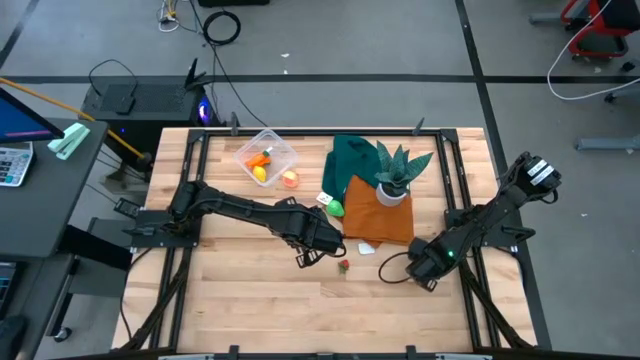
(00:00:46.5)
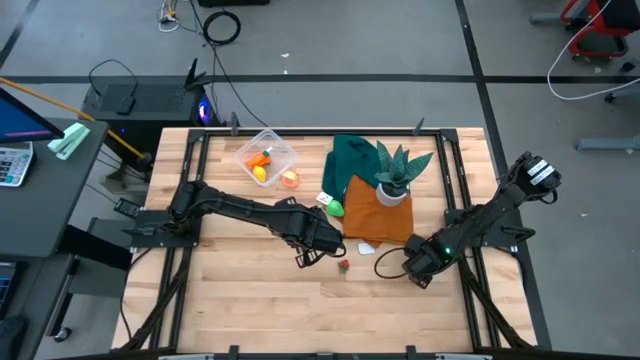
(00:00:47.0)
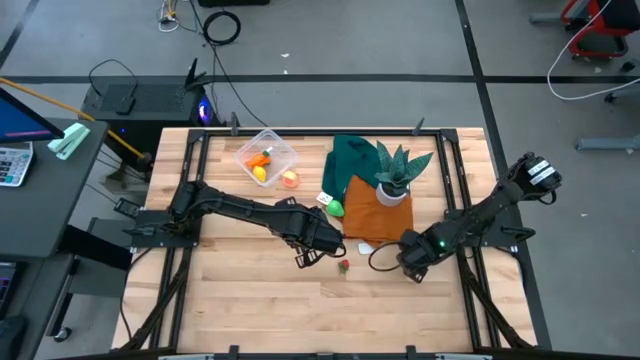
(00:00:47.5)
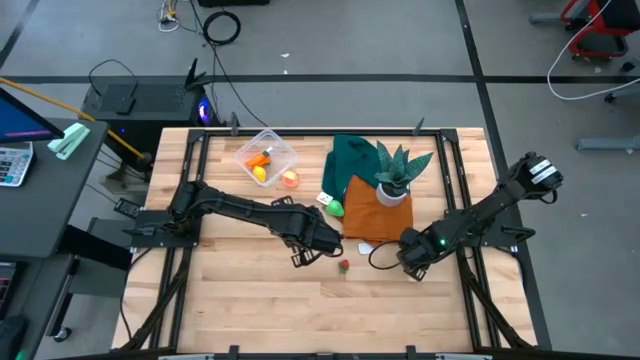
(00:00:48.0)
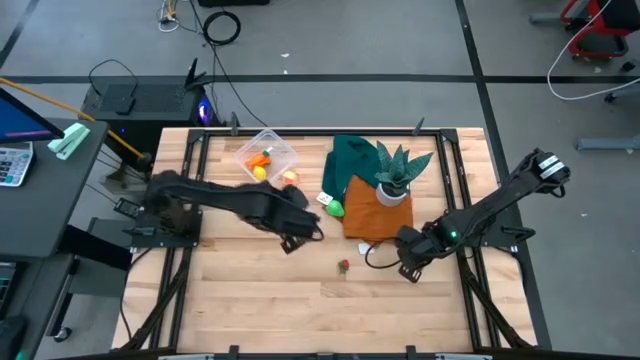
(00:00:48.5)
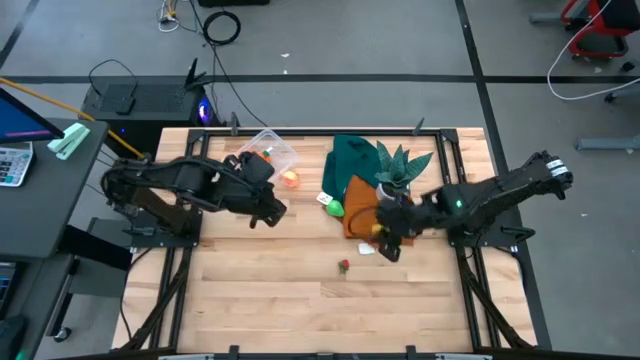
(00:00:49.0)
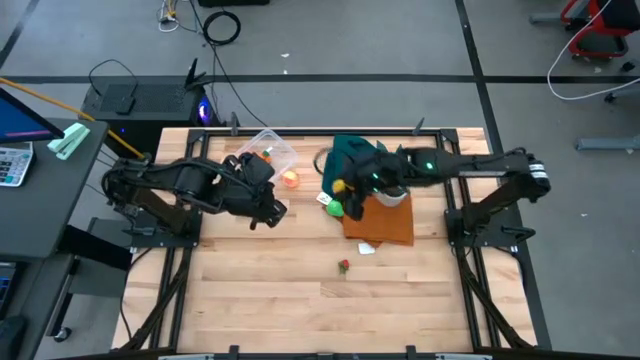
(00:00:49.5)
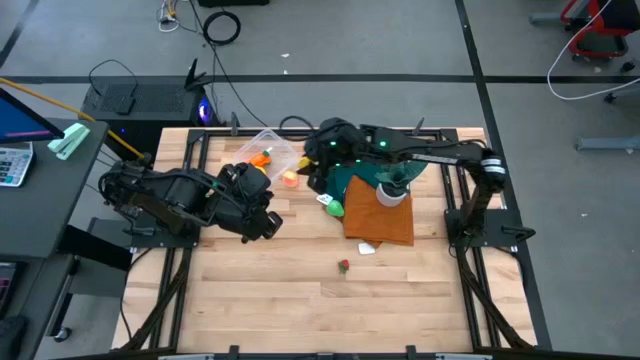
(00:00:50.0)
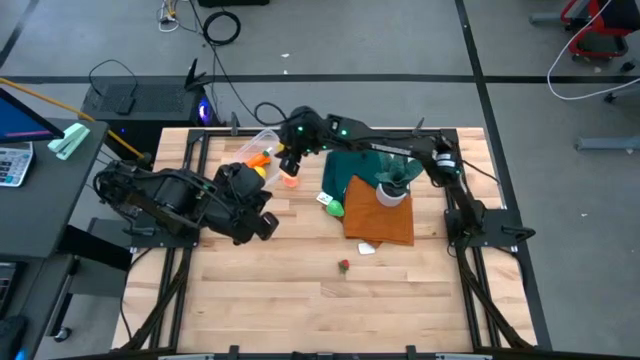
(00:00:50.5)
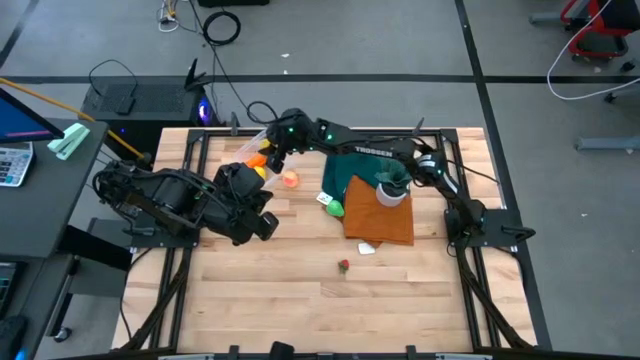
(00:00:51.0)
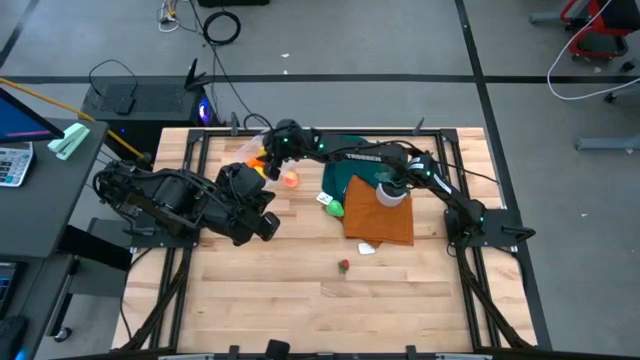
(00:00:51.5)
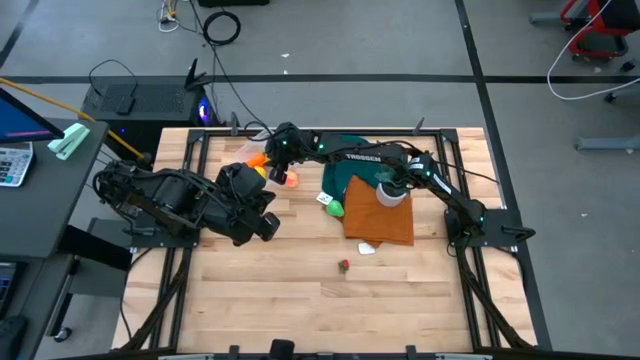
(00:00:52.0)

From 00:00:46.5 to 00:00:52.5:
Task: Pick and placing Produce into tupperware
Put the lemon into the transparent container

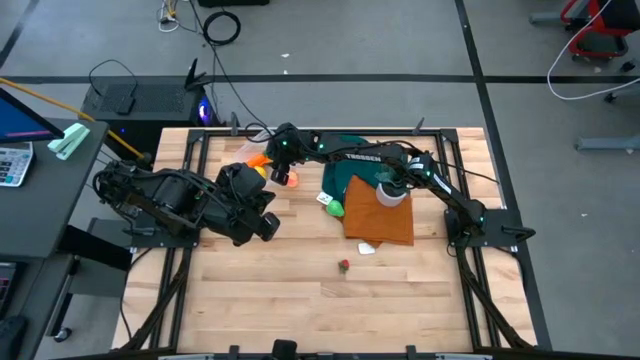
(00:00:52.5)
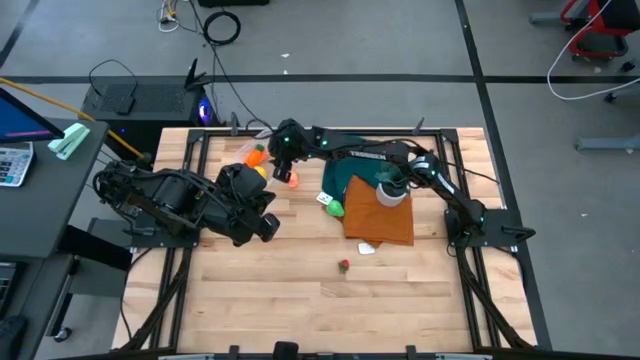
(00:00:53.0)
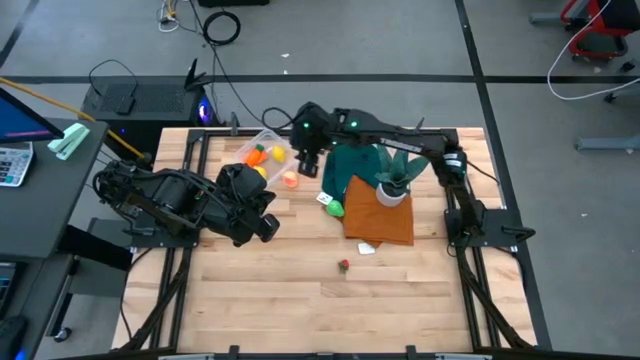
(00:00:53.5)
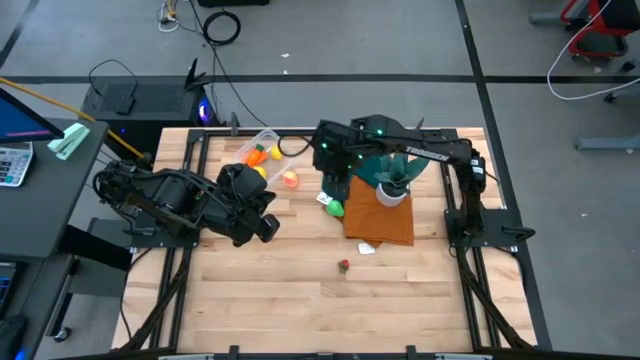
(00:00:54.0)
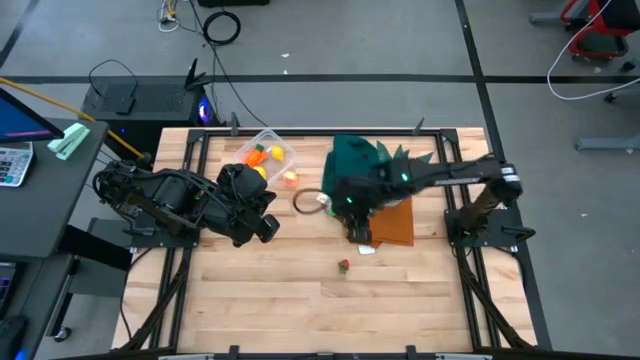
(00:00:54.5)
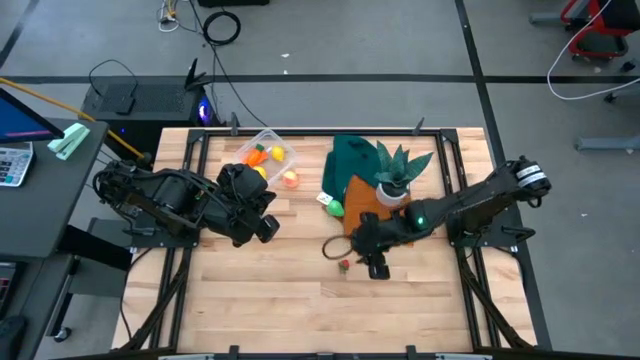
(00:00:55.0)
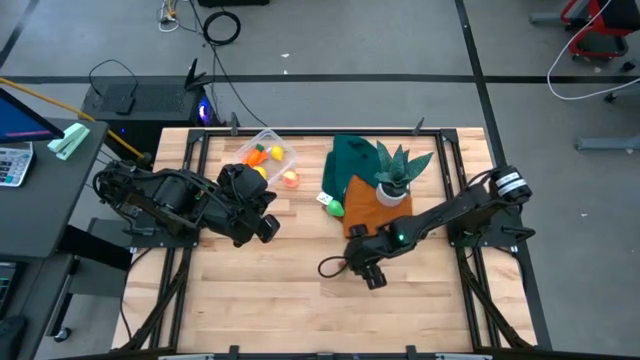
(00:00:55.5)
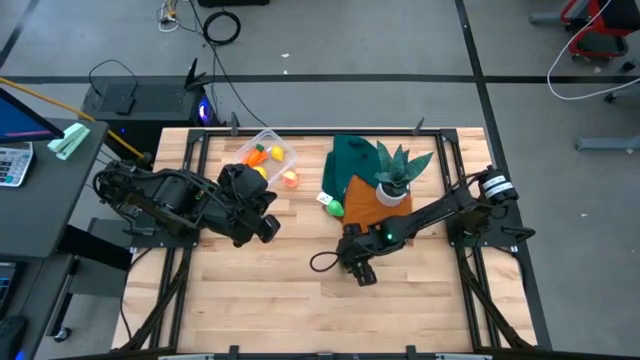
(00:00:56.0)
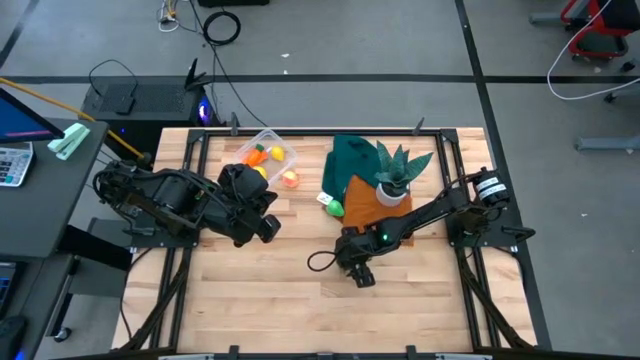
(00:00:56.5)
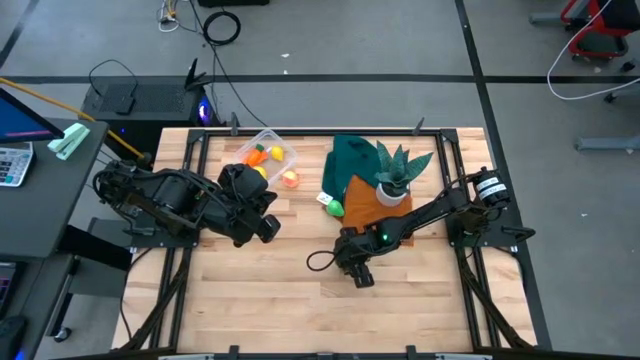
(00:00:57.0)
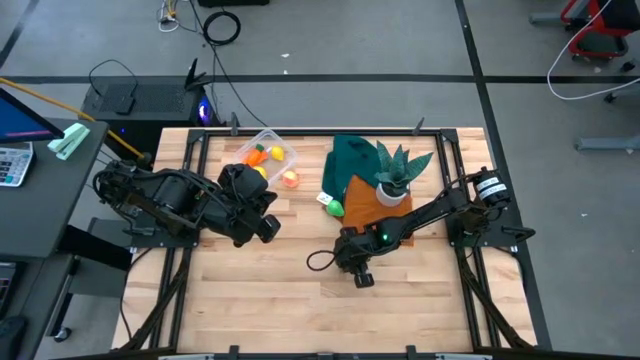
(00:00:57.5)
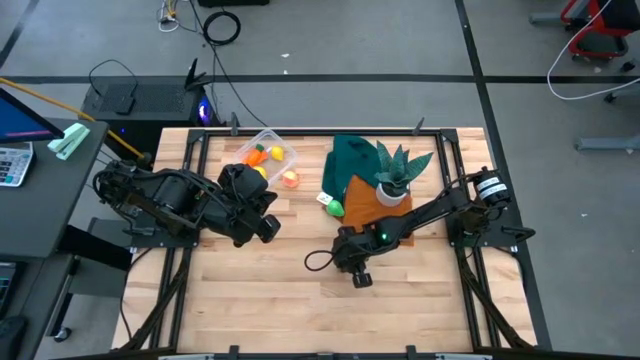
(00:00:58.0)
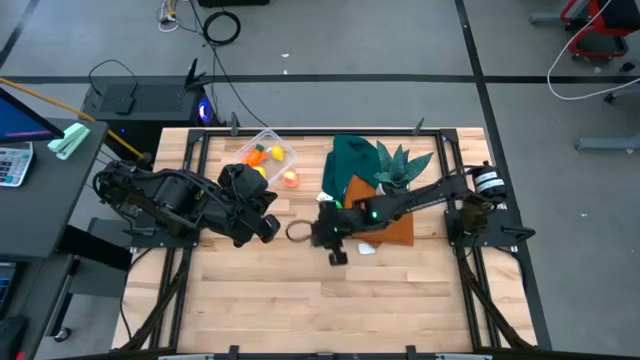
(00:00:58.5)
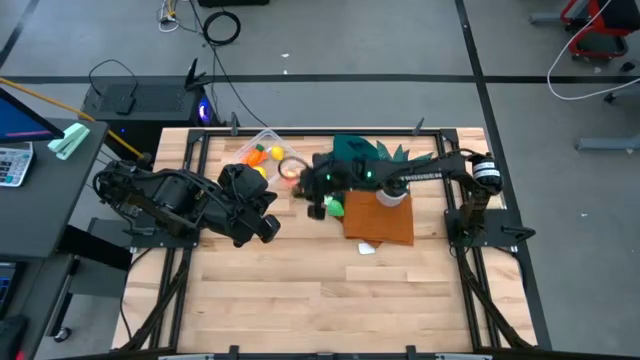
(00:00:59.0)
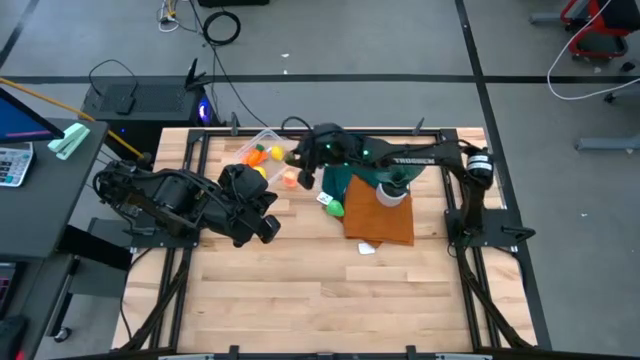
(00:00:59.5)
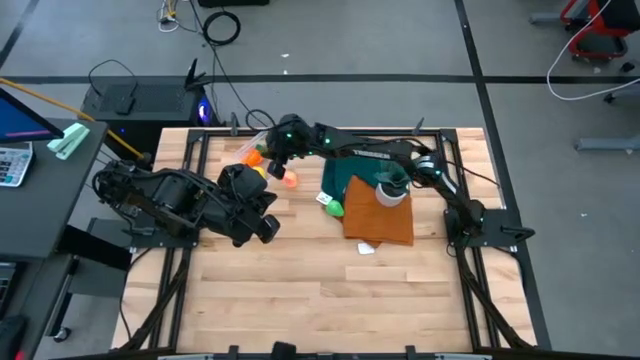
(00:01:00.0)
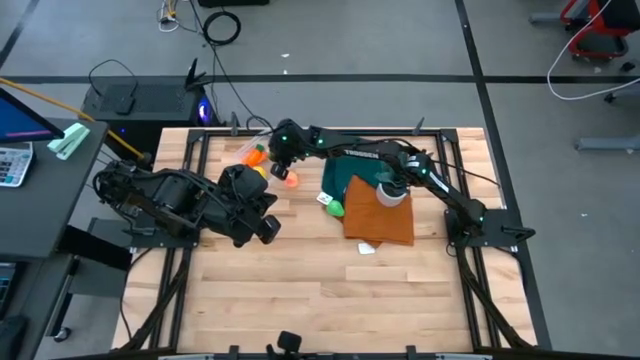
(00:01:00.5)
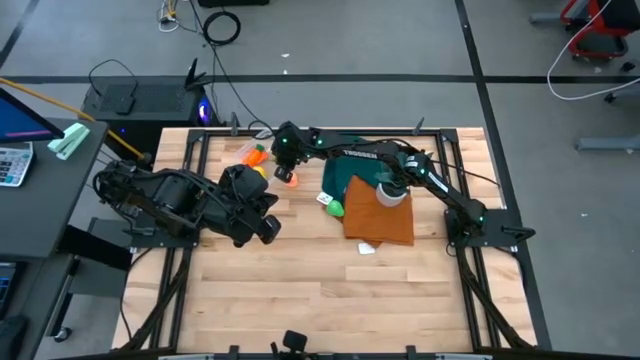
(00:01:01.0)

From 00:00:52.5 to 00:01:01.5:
Put the strawberry into the transparent container

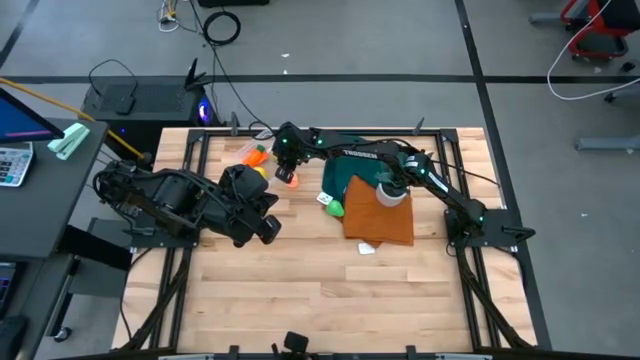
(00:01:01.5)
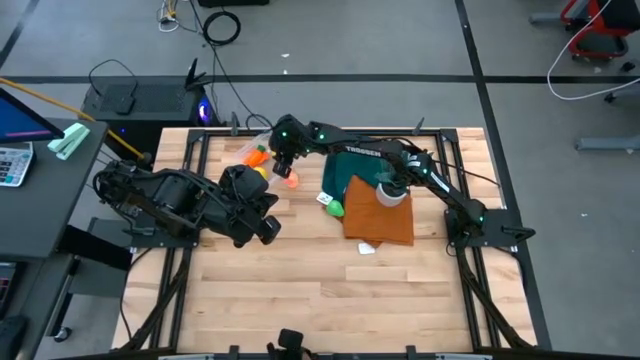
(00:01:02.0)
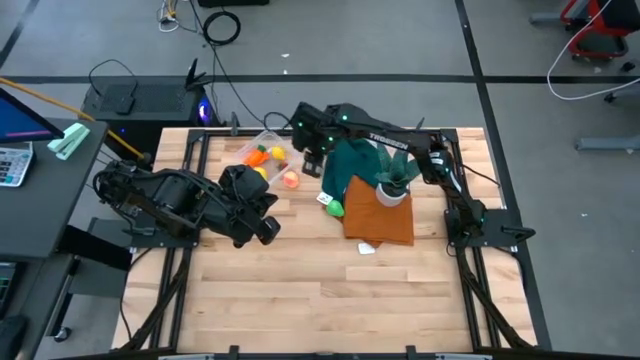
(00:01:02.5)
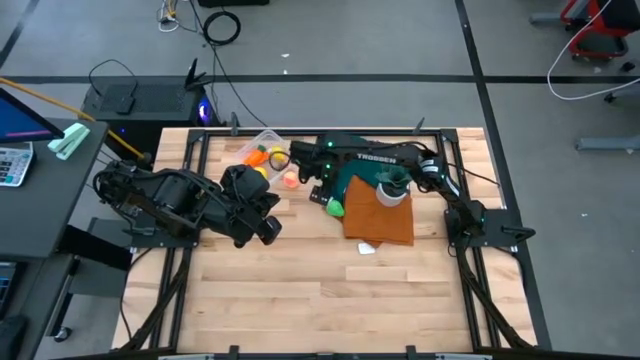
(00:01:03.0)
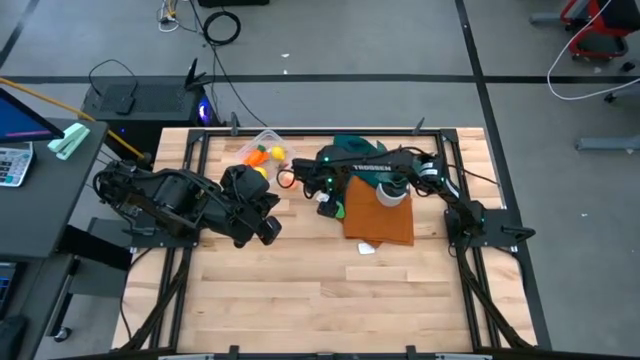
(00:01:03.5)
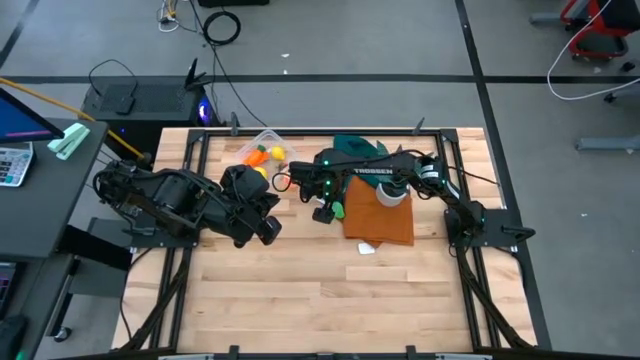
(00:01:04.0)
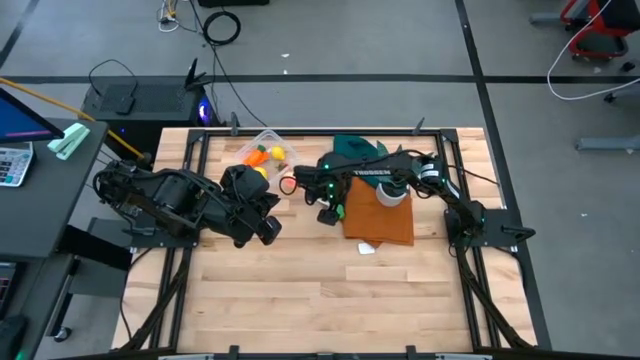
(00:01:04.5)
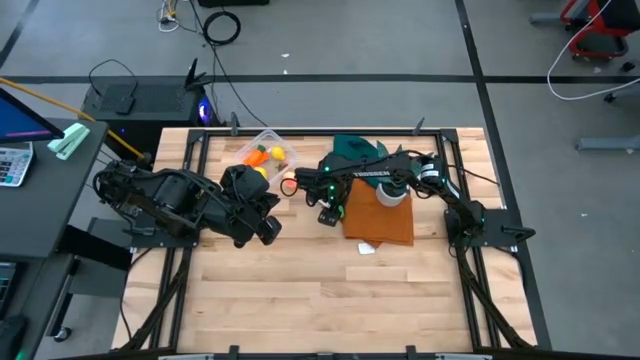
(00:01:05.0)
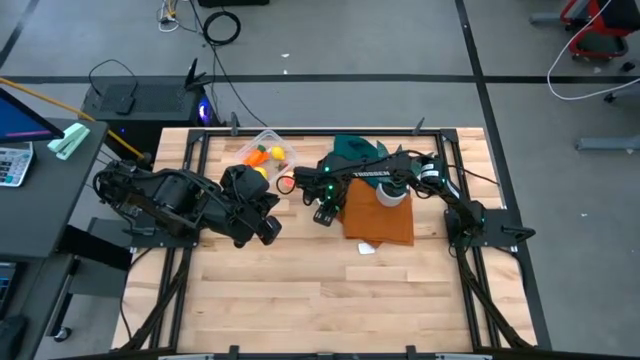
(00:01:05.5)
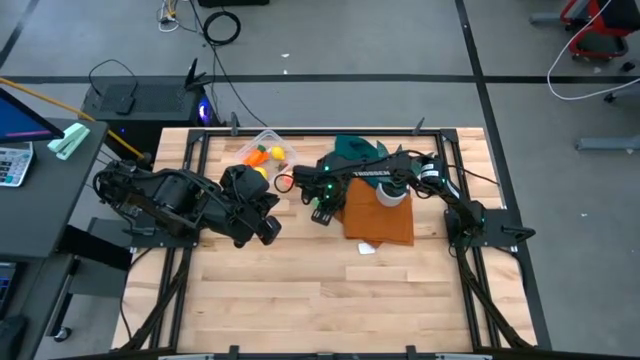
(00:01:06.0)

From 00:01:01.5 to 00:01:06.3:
Put the pear into the transparent container

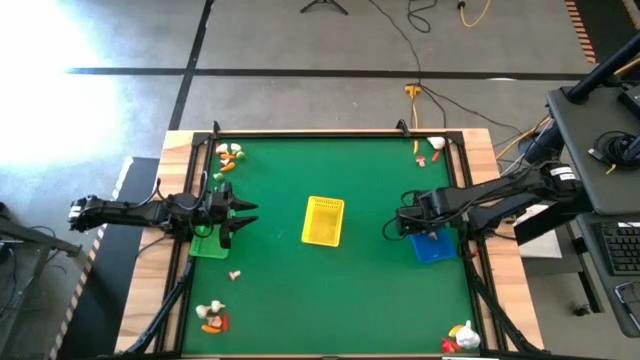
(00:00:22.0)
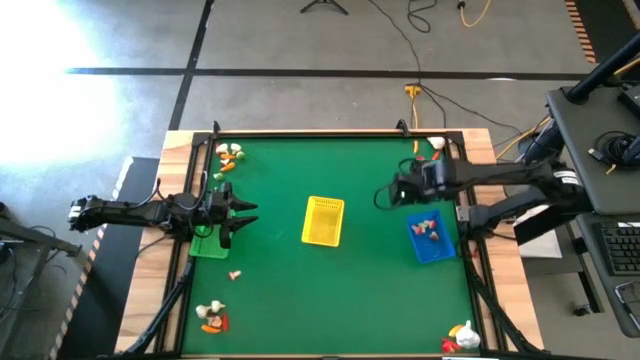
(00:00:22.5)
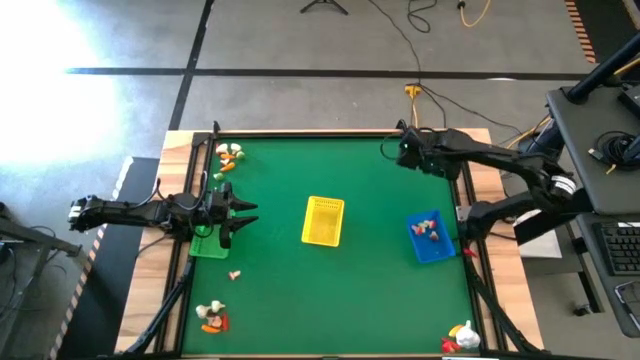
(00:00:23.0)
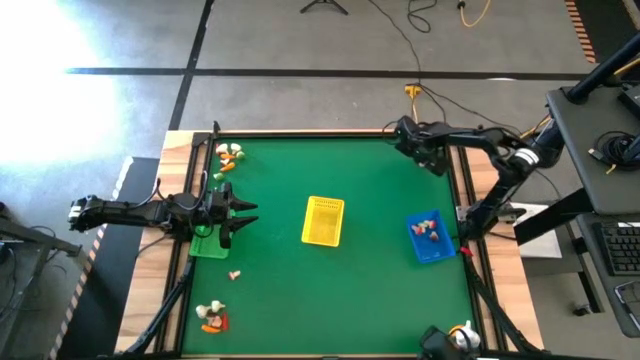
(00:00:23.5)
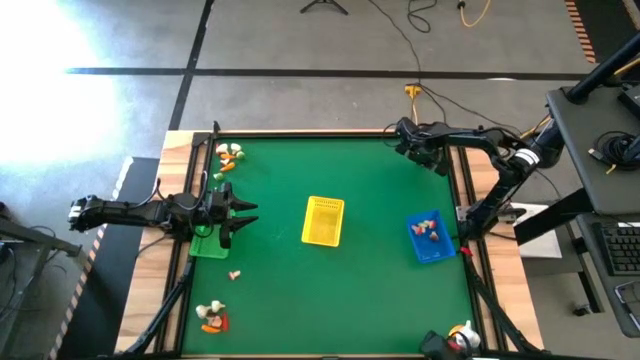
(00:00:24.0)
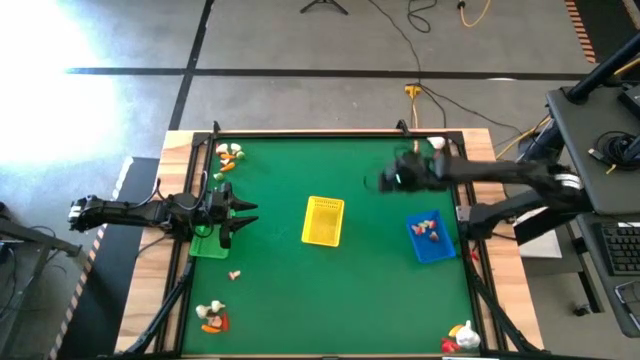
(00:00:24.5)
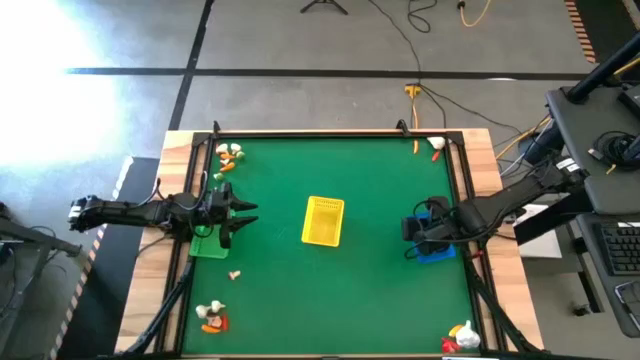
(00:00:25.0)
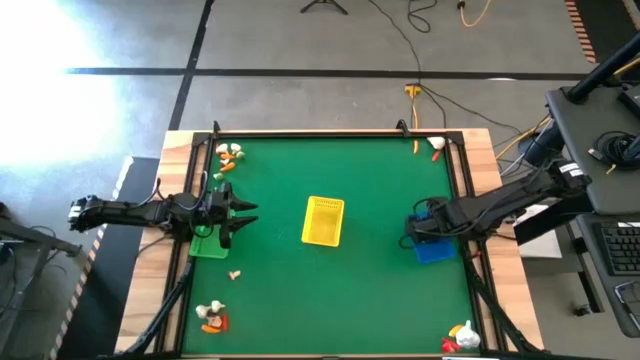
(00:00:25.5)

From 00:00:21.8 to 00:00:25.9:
Task: Sort produce into baskets
Put the red mushroom into the blue bin
